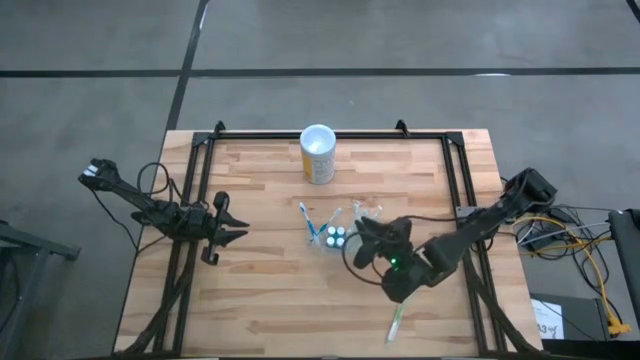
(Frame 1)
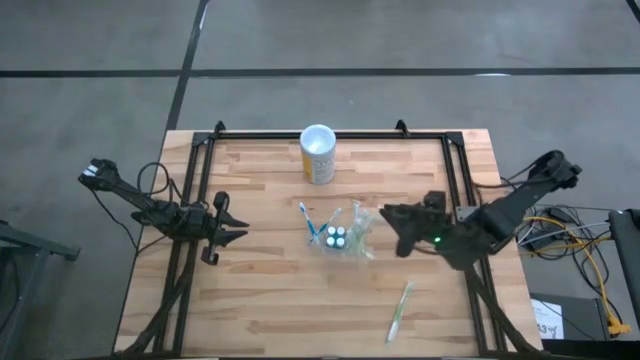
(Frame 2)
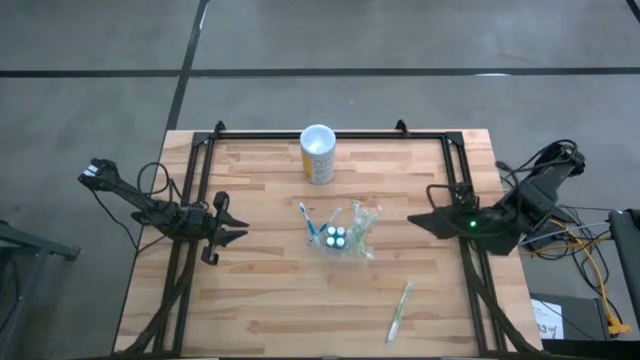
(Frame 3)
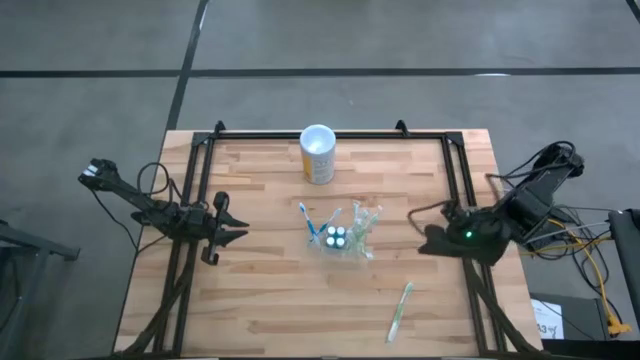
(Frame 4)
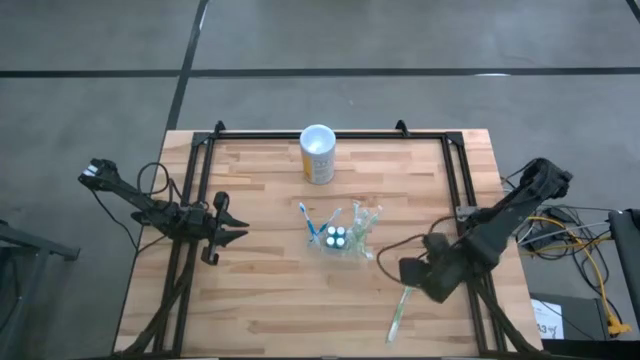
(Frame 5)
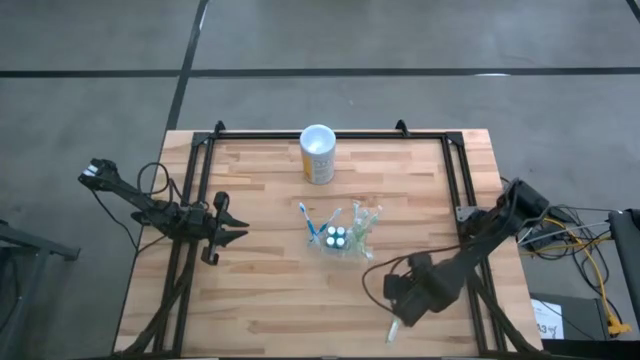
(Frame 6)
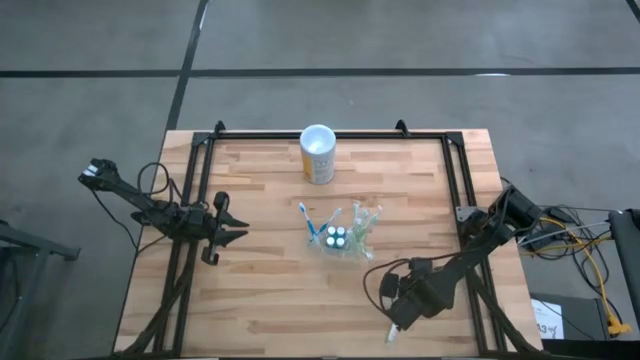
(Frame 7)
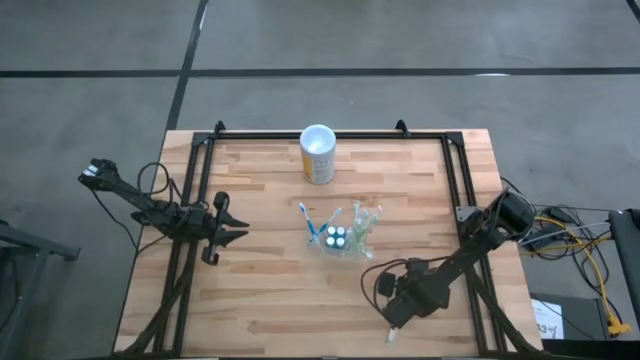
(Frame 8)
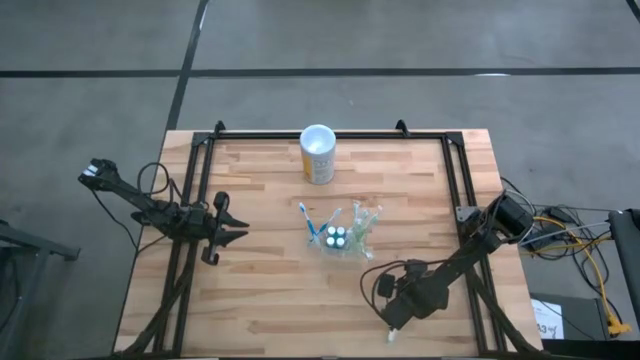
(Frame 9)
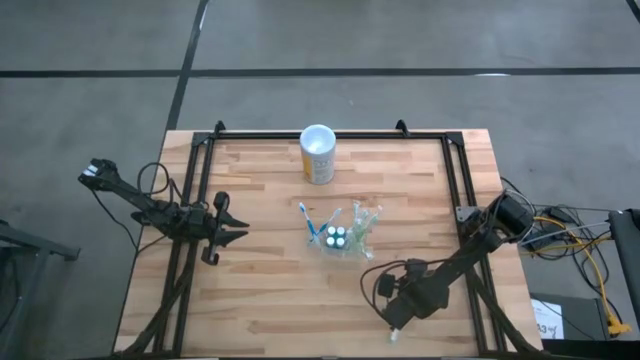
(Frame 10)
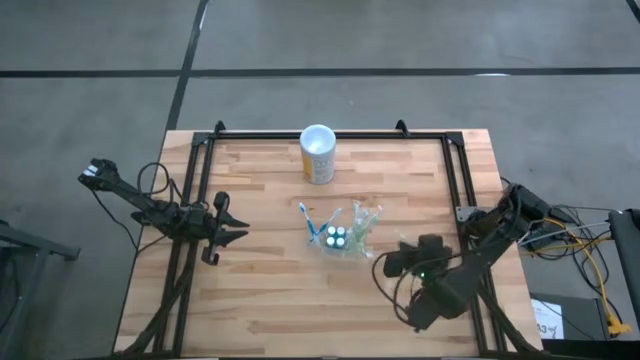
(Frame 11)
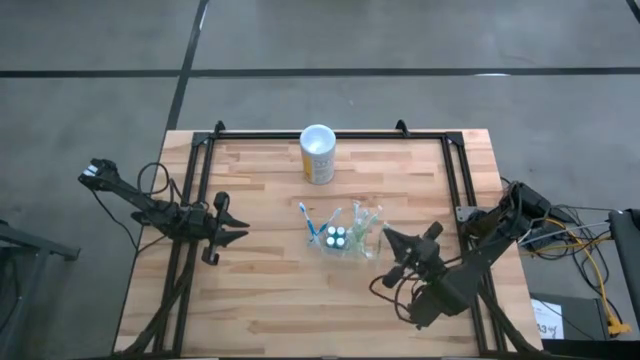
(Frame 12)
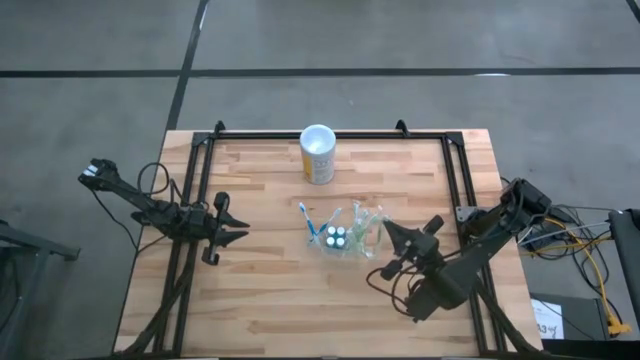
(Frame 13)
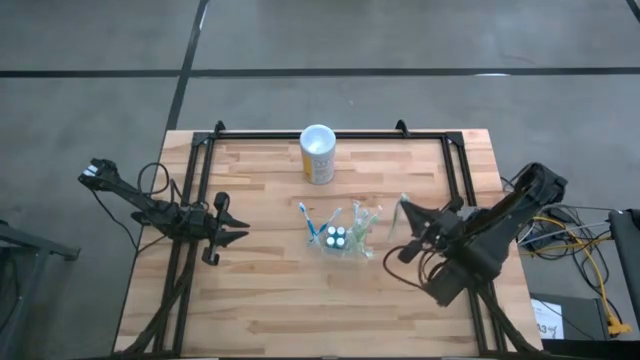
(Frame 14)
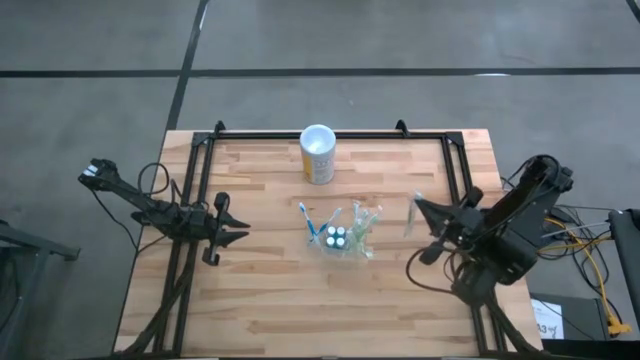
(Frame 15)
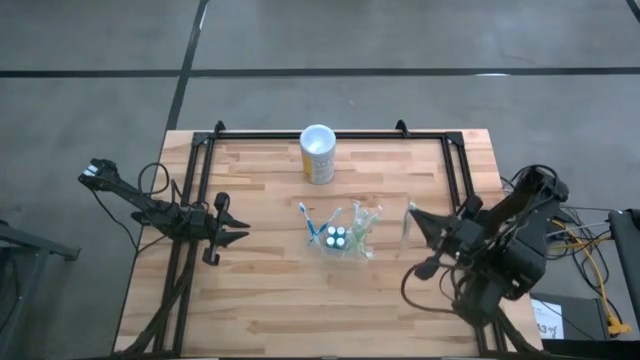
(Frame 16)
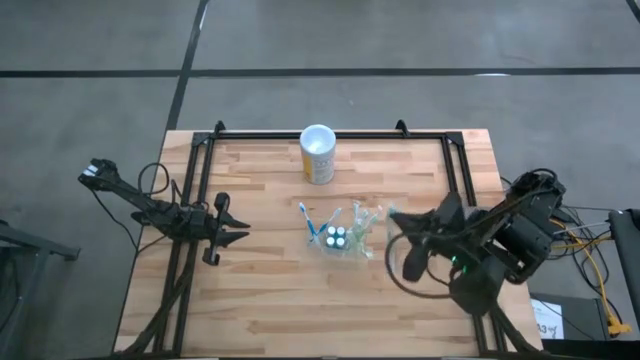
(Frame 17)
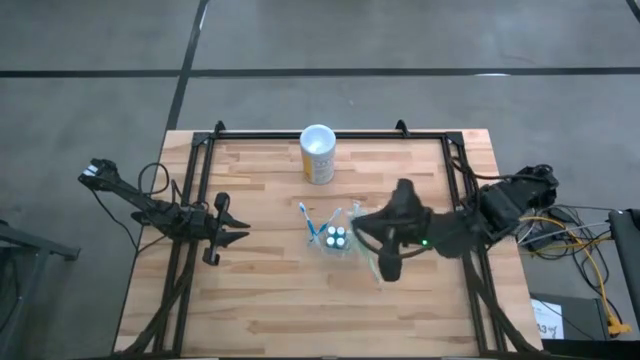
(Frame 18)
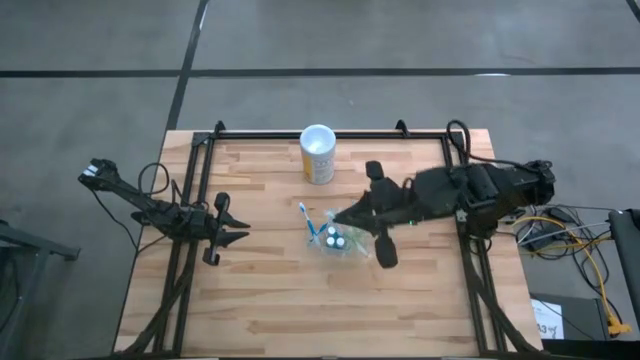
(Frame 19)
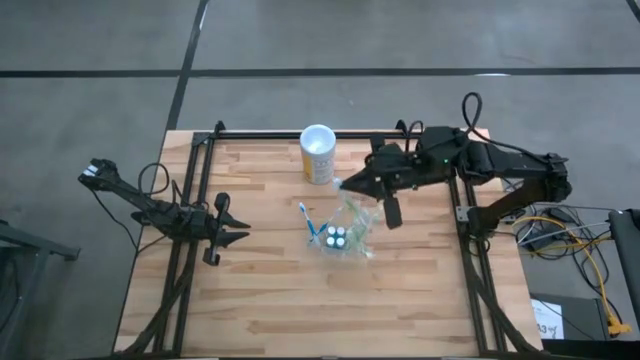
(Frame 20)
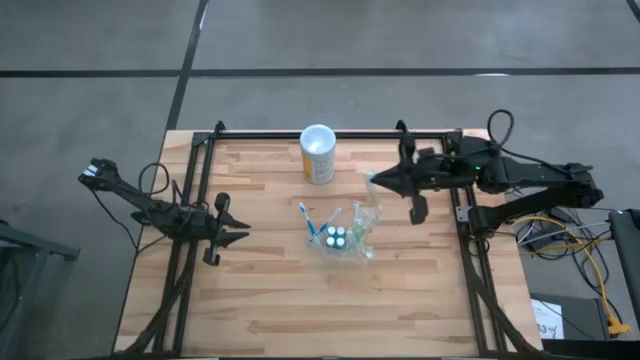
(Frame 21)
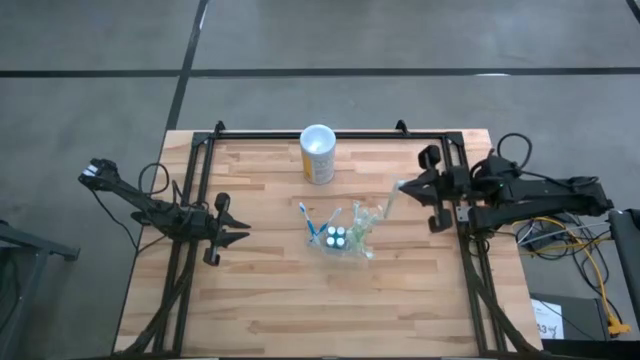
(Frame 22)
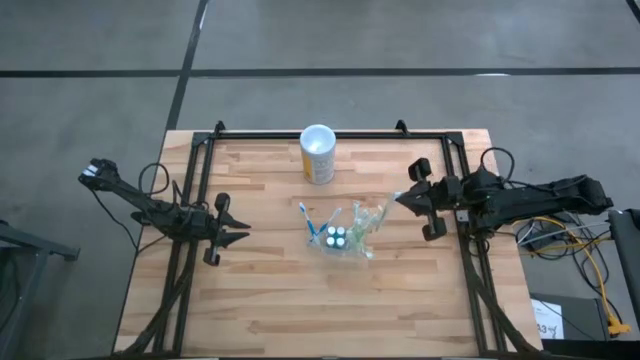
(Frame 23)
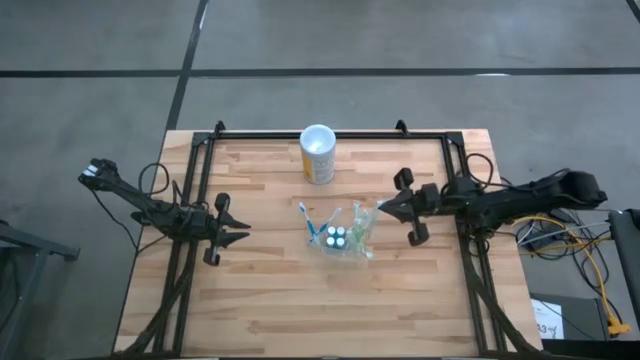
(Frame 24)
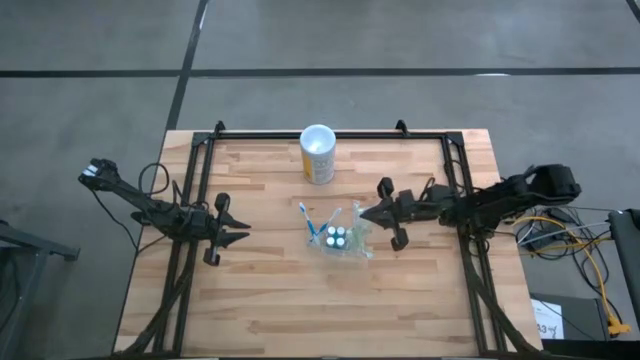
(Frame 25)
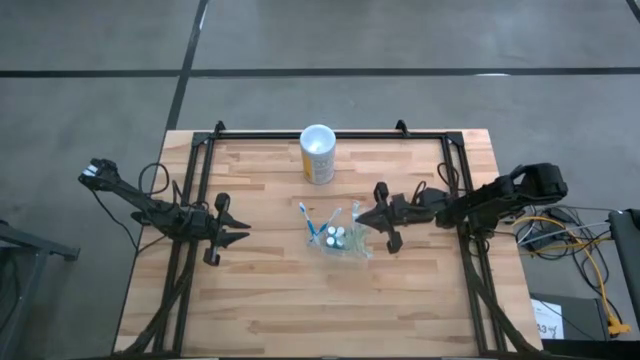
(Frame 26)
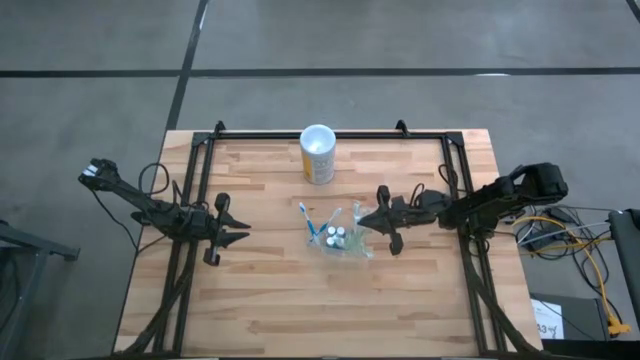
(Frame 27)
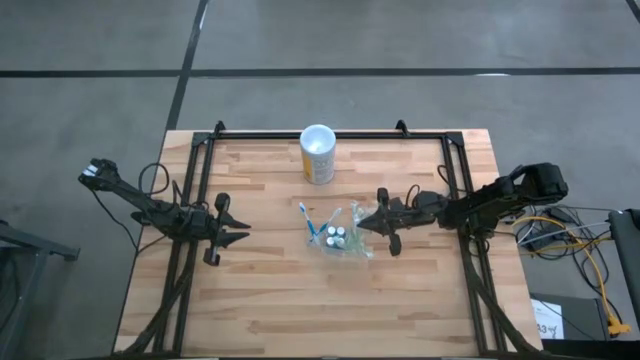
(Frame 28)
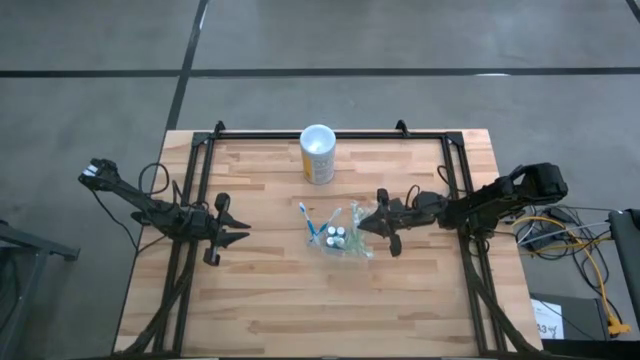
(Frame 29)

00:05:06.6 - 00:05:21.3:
Task: Pick & Place toothbrushing station
Put the green toothbrush into the right section of the transparent organizer

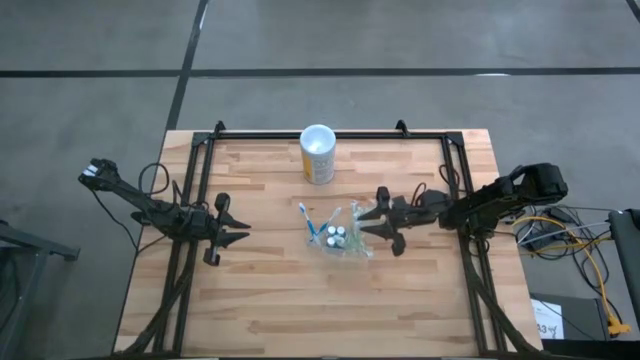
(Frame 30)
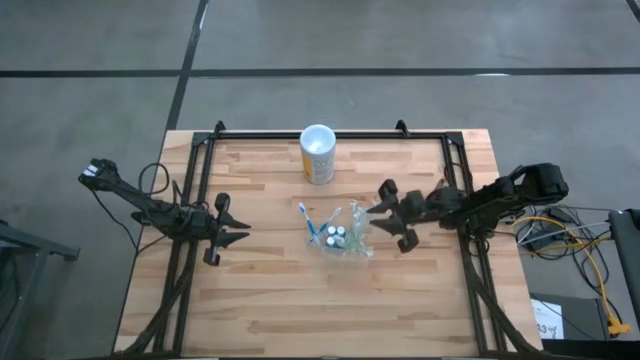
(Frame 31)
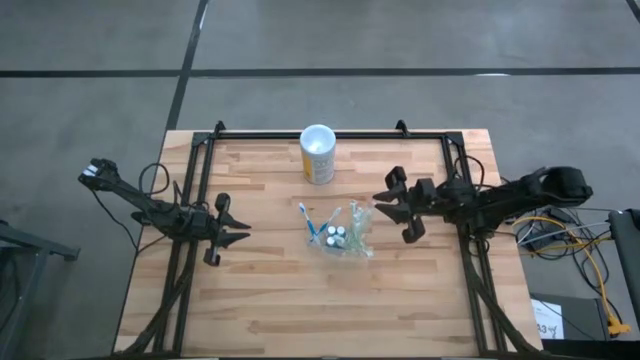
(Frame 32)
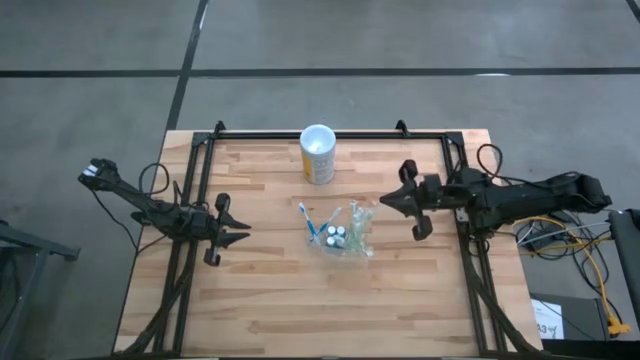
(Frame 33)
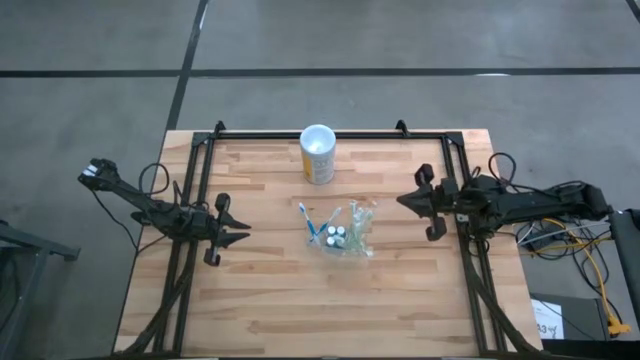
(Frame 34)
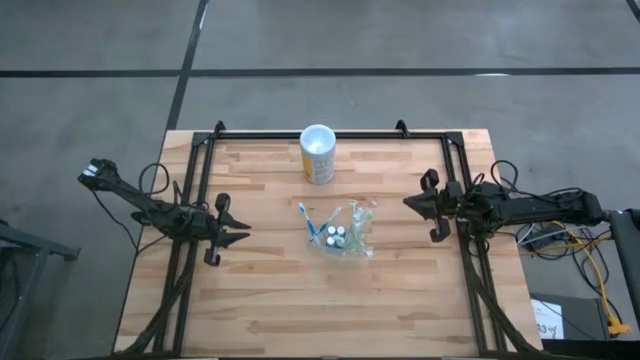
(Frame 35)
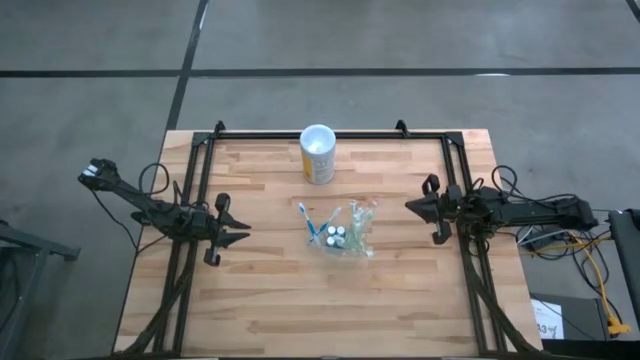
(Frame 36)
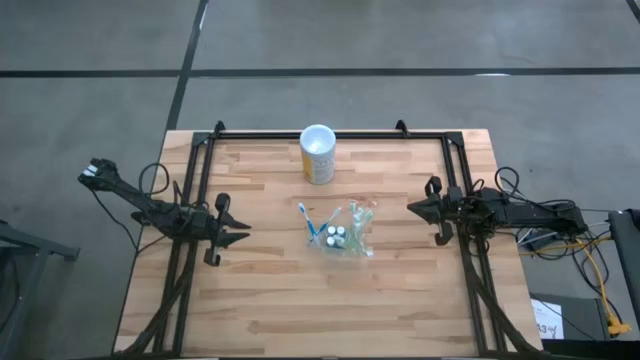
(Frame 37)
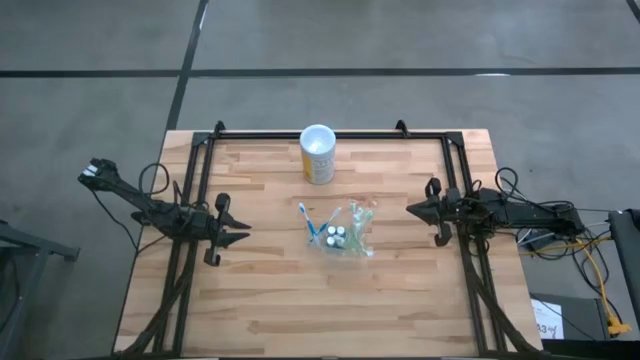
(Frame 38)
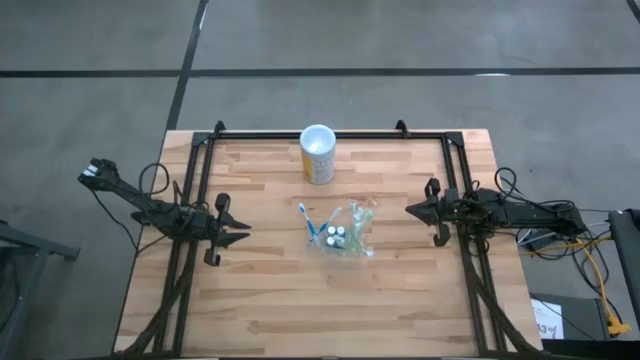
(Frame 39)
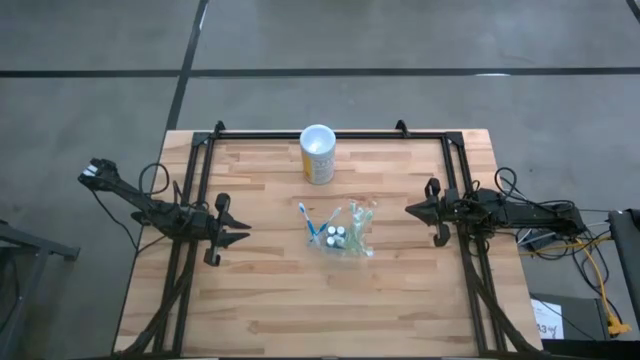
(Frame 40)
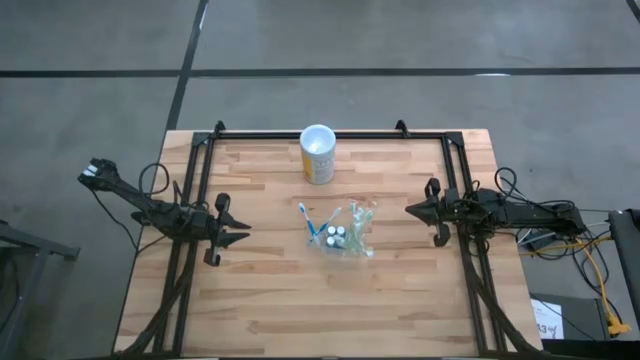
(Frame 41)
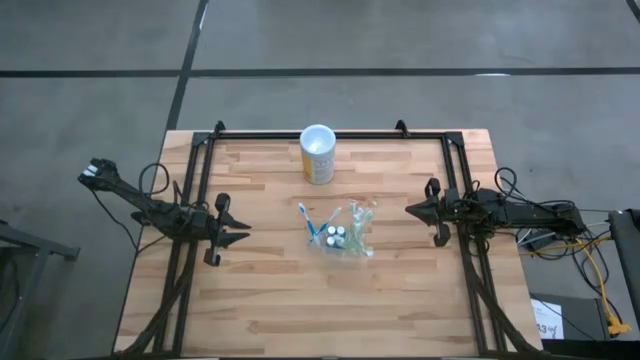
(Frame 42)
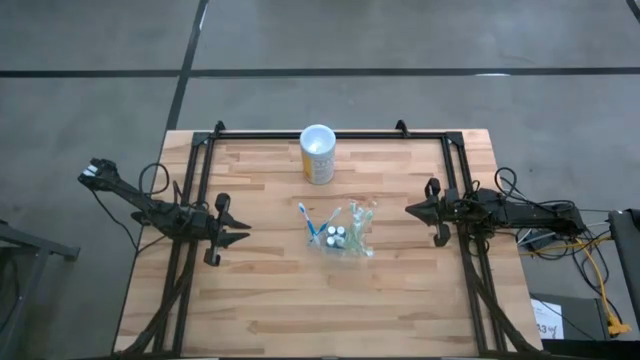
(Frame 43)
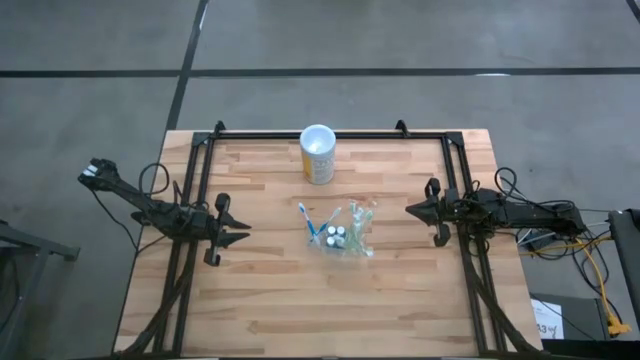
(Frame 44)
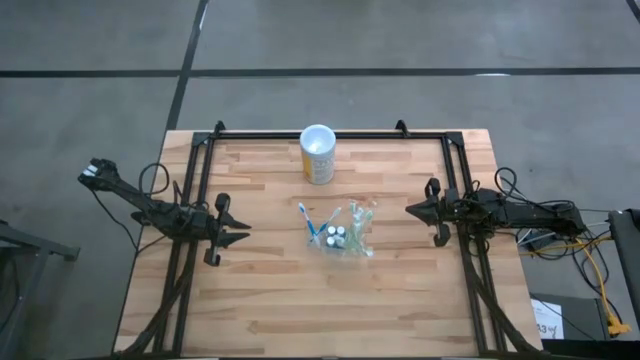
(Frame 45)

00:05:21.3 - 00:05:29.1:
Return to Home Position
